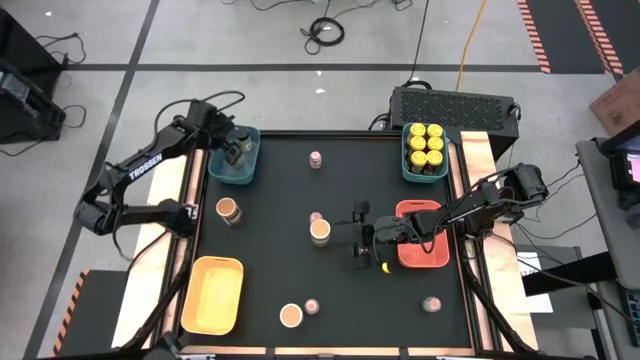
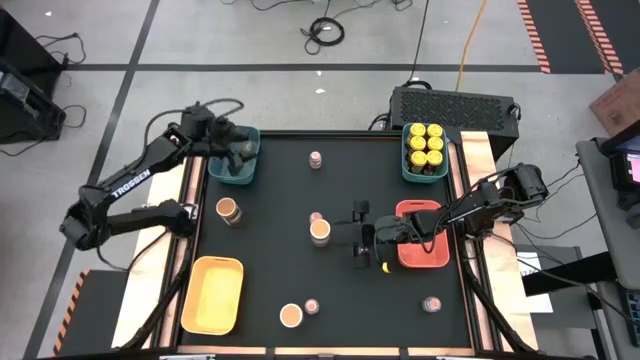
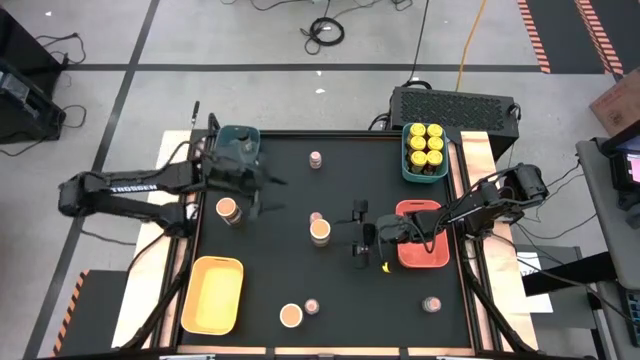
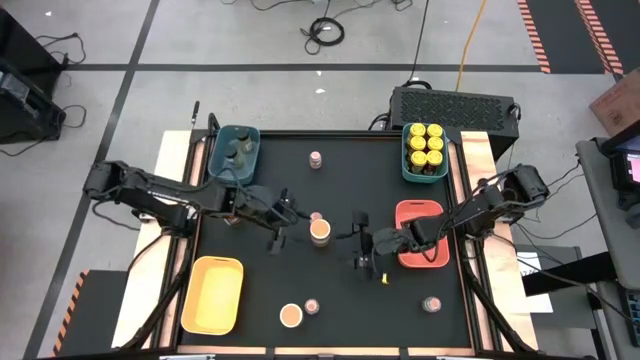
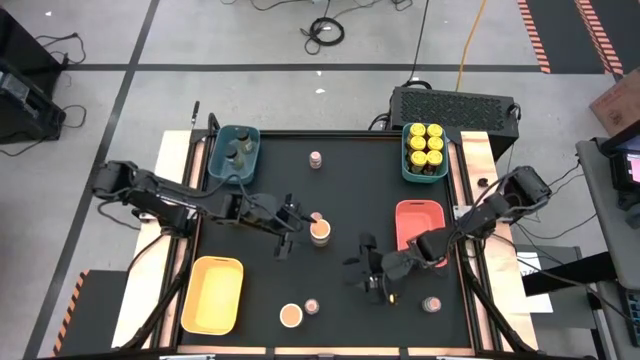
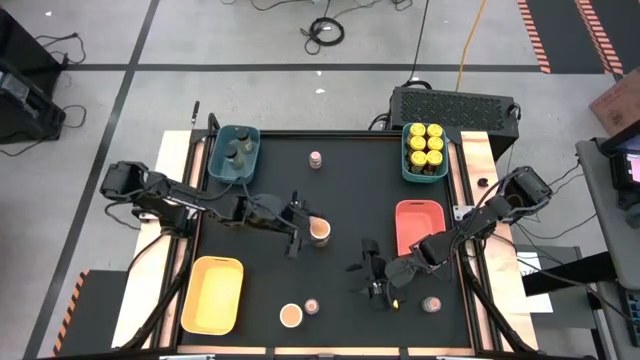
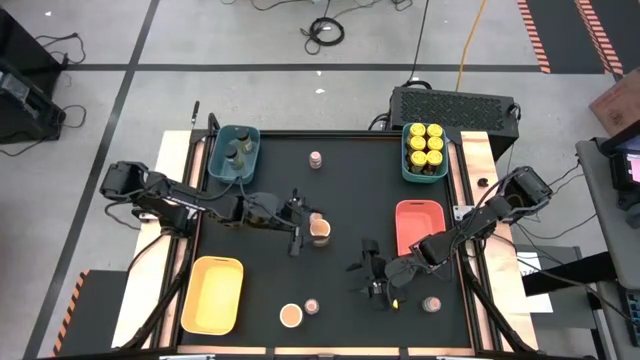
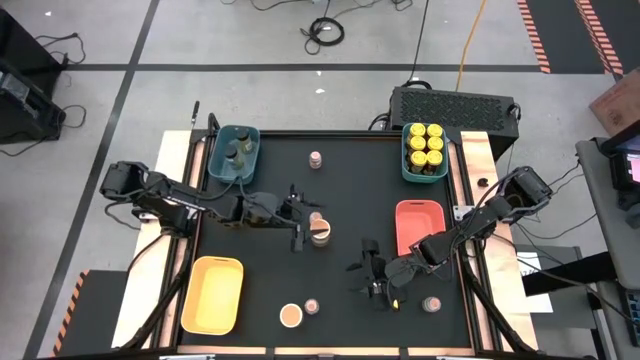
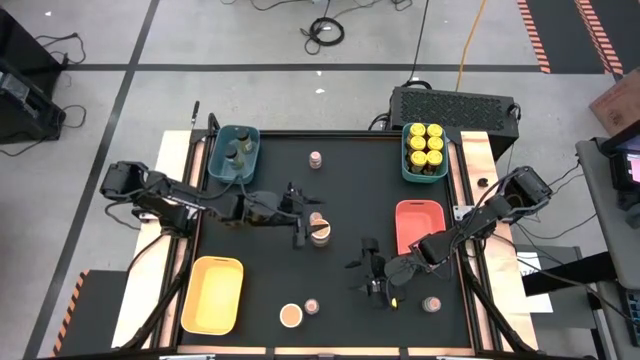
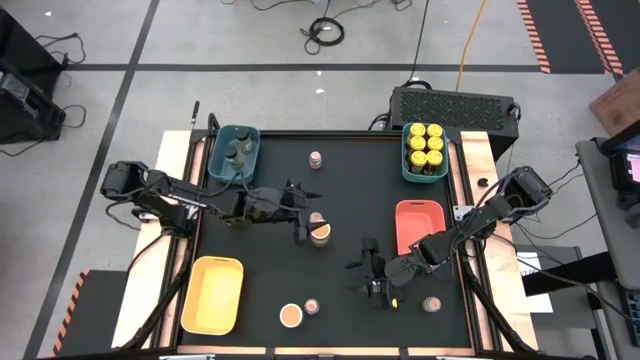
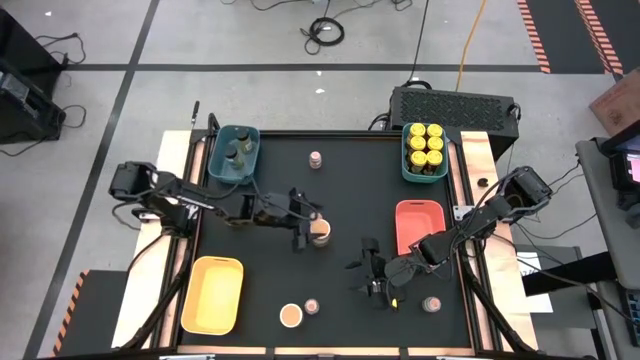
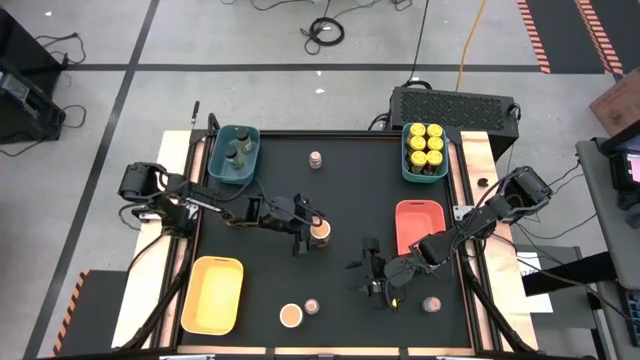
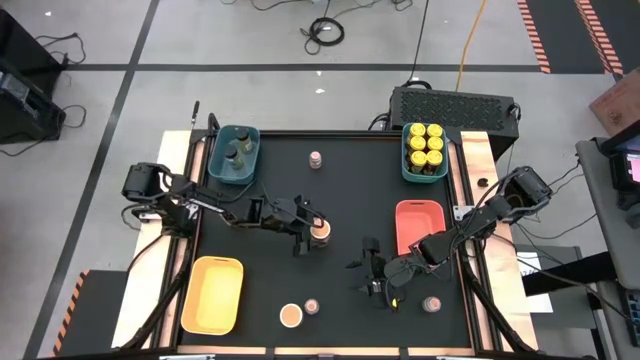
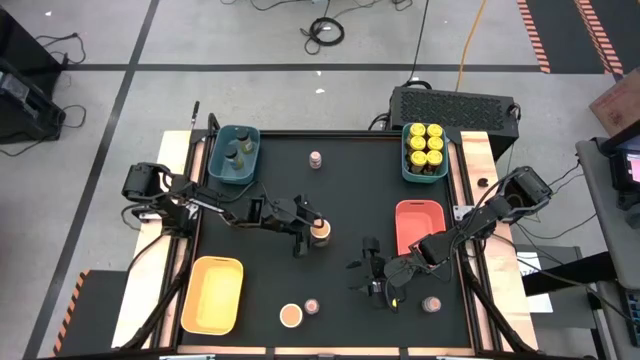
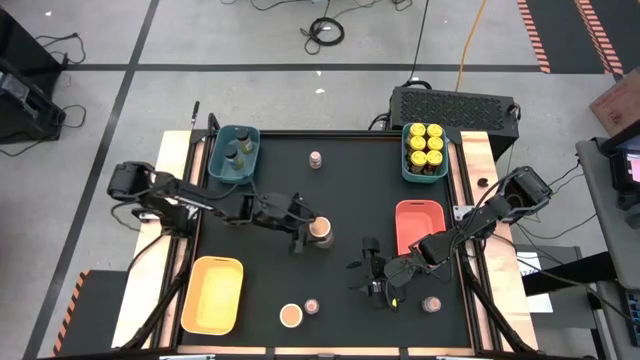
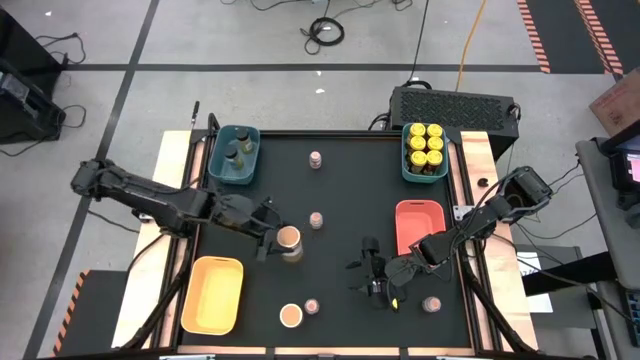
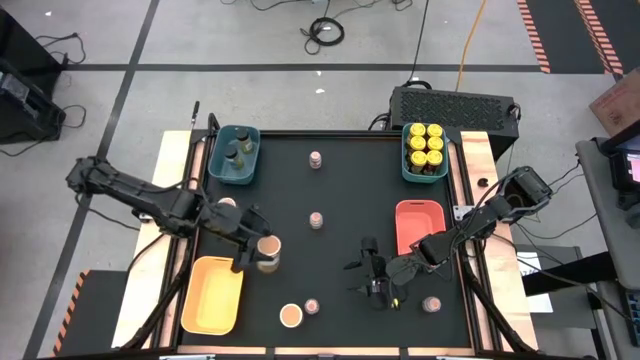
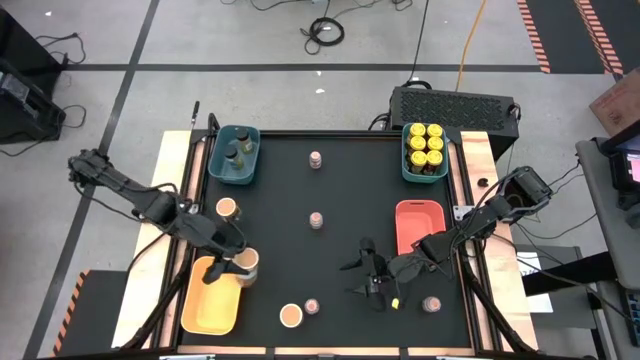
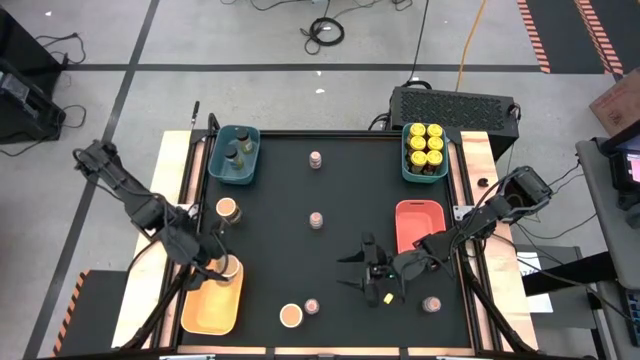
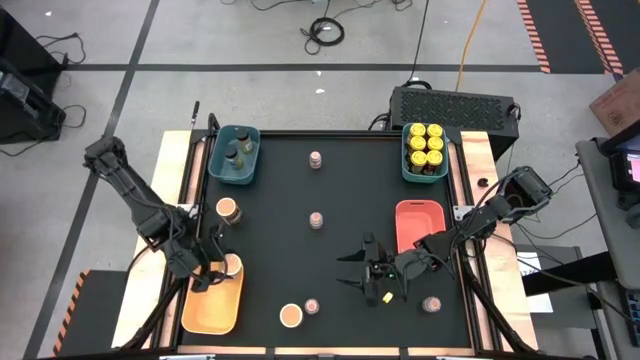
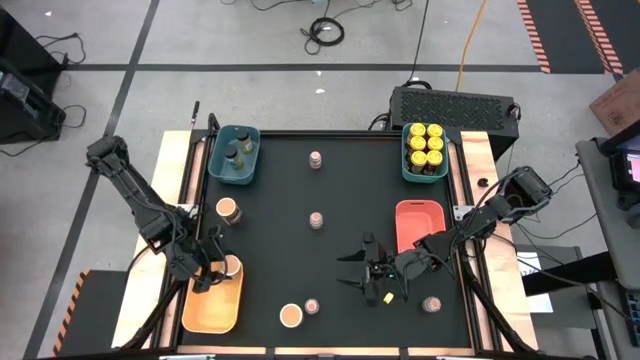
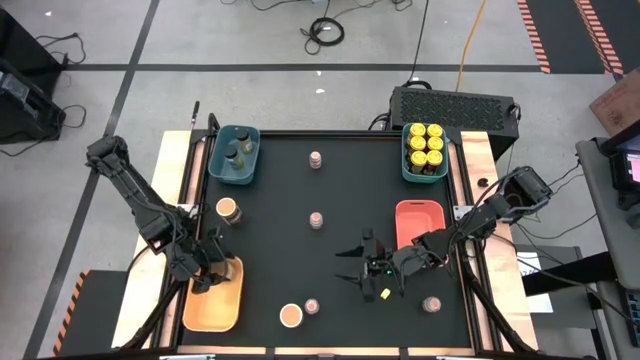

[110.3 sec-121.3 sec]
Task: Sort spices by type
Put the gold spice bottle into the yellow bin

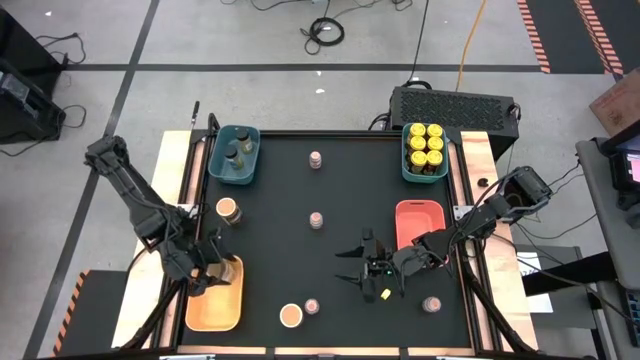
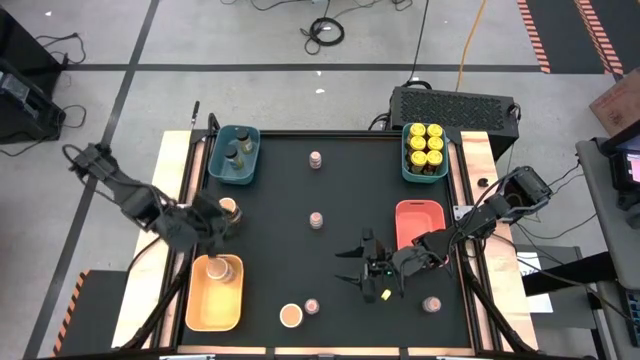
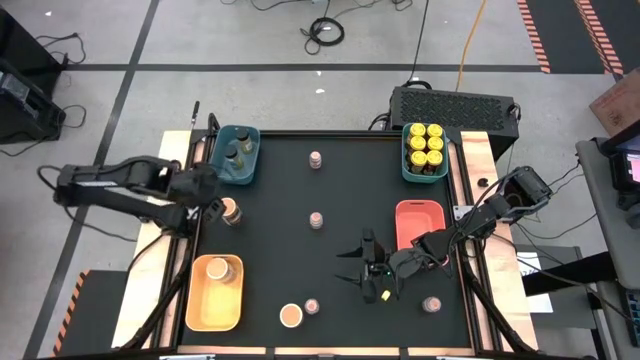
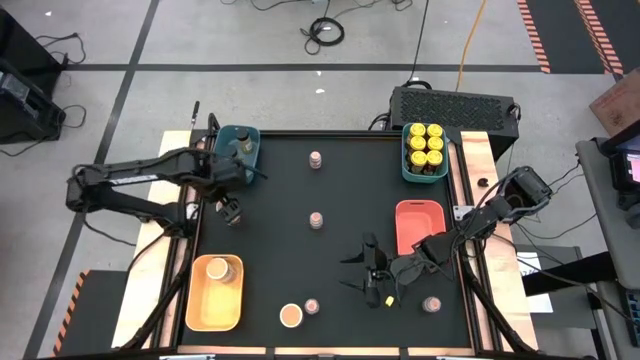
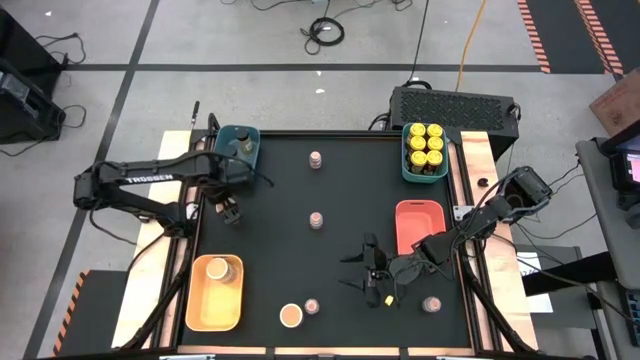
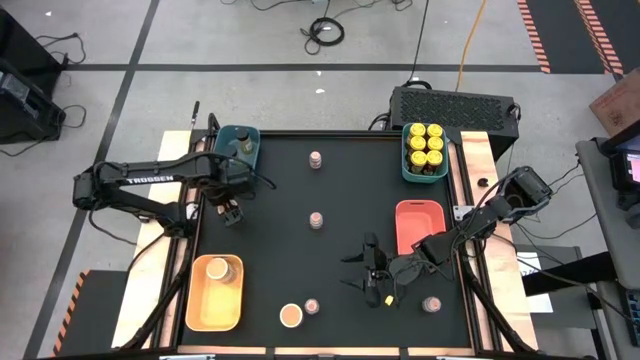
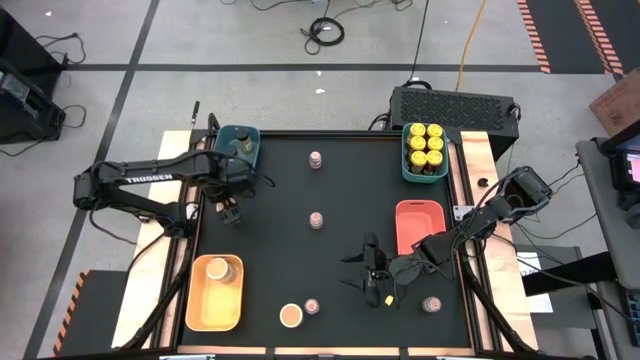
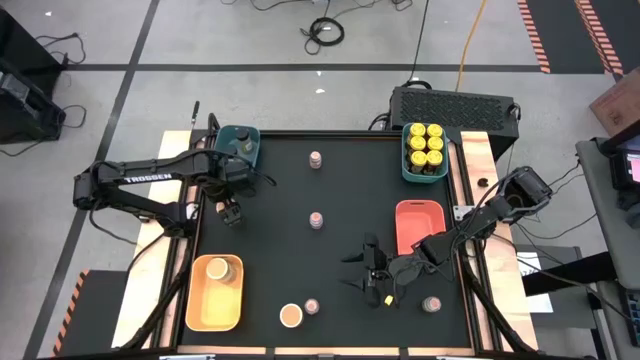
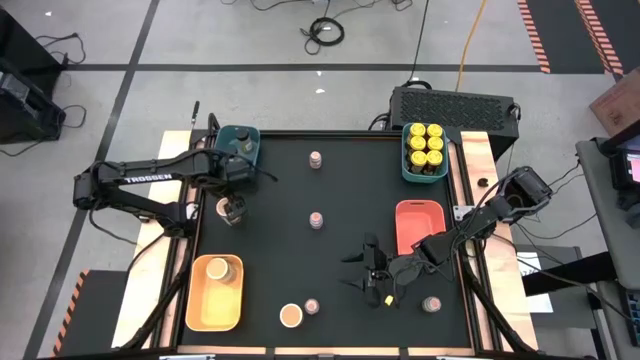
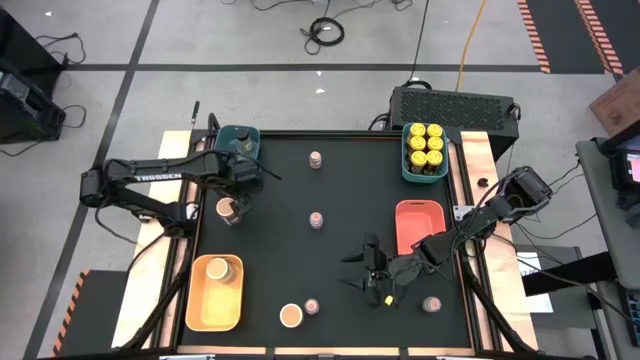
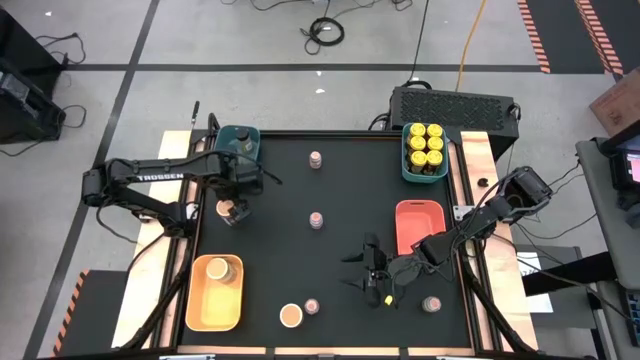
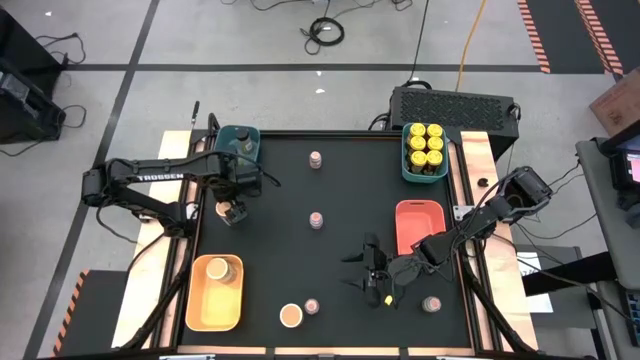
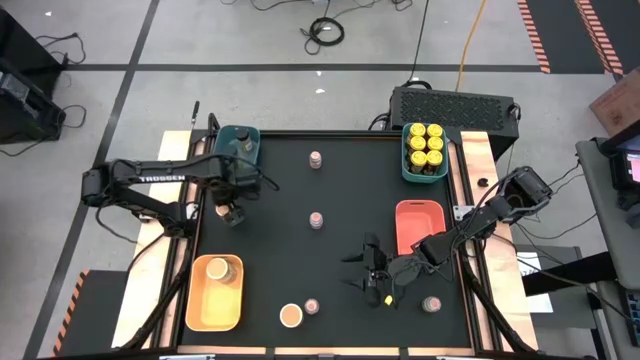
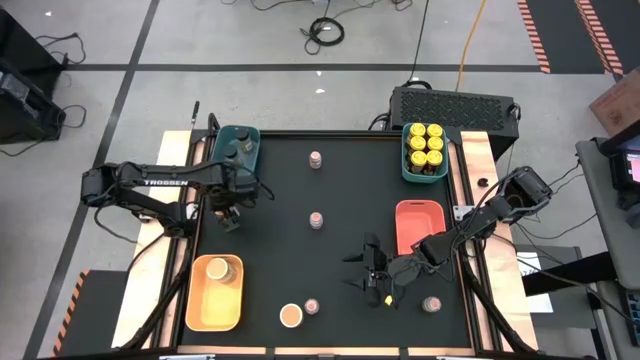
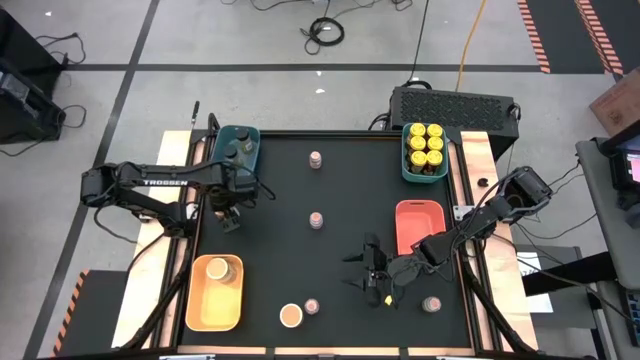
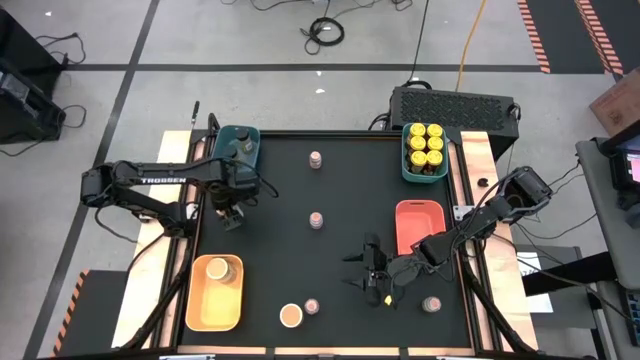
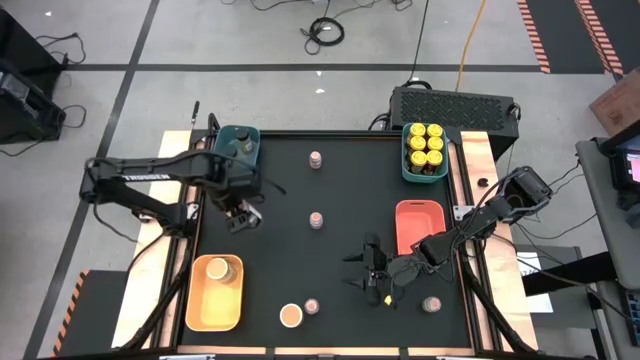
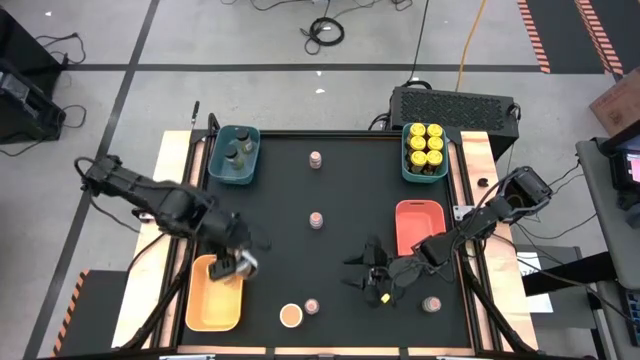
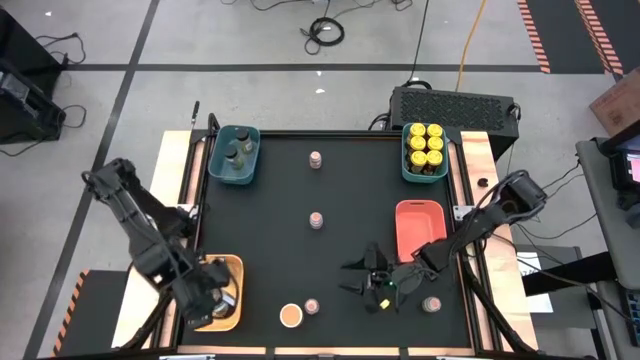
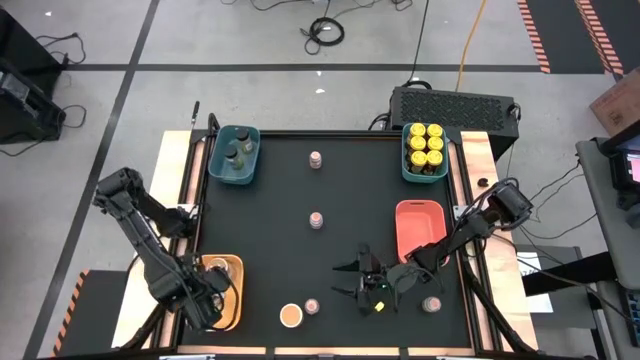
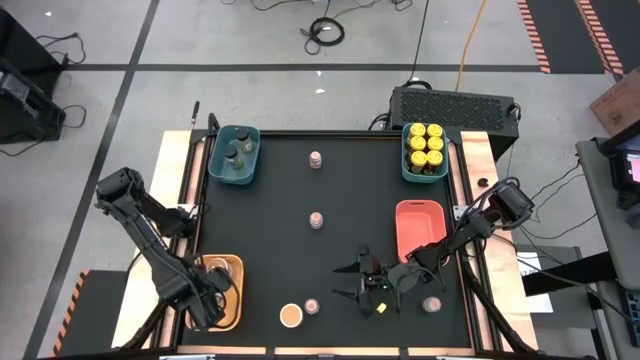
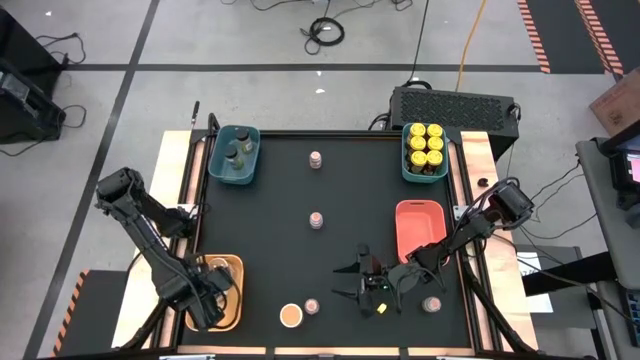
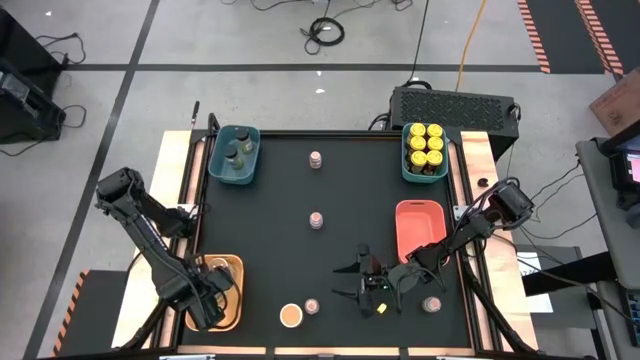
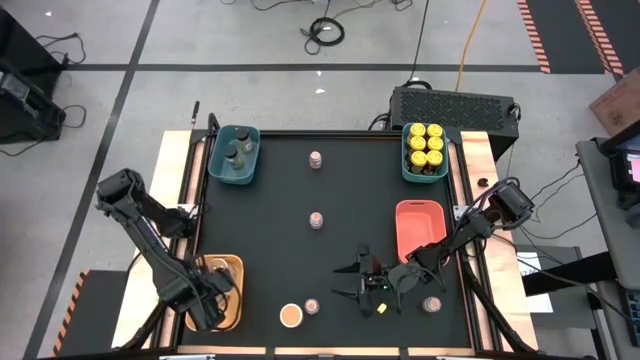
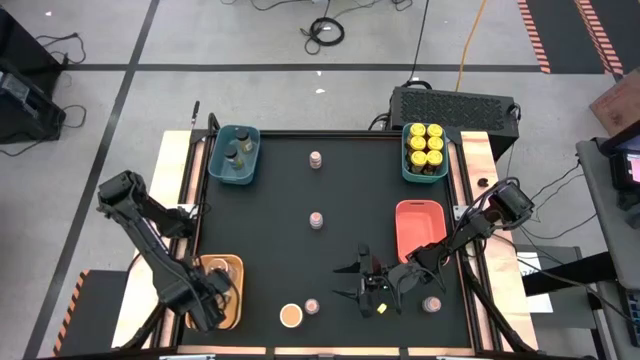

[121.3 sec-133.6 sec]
Put the gold spice bottle into the yellow bin
